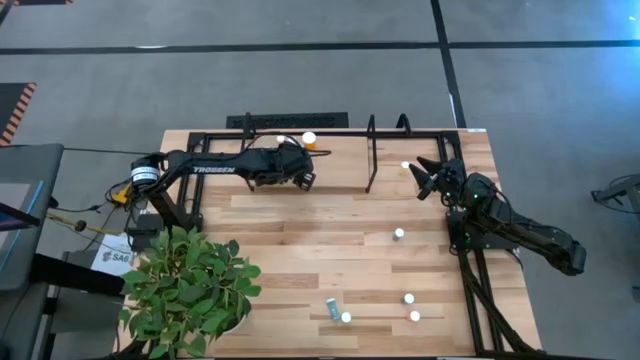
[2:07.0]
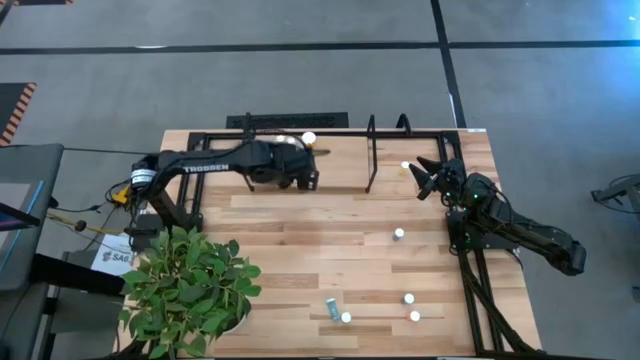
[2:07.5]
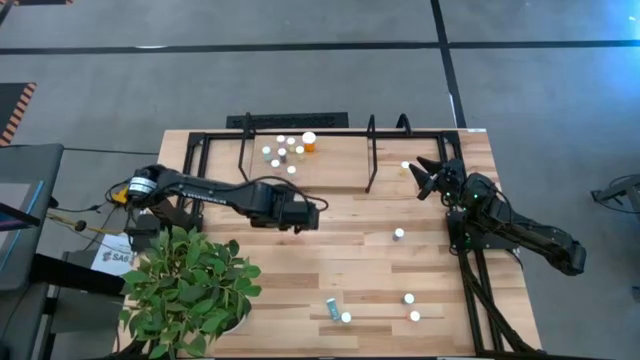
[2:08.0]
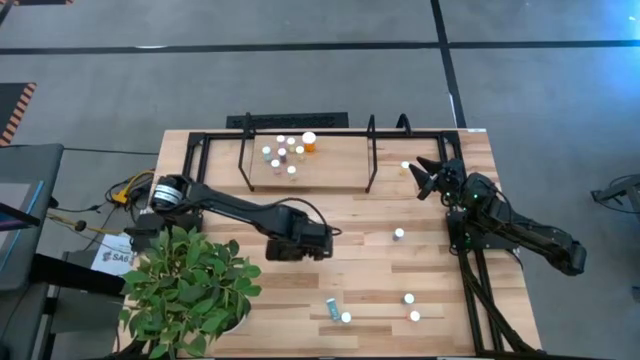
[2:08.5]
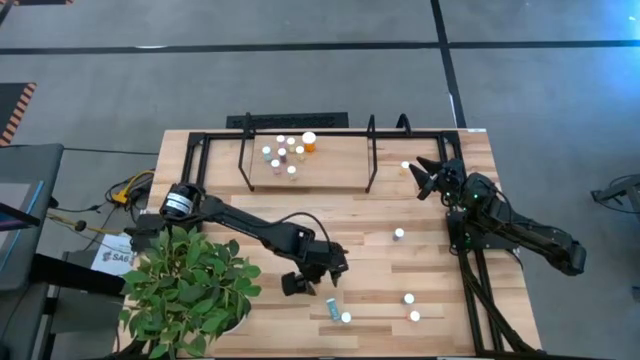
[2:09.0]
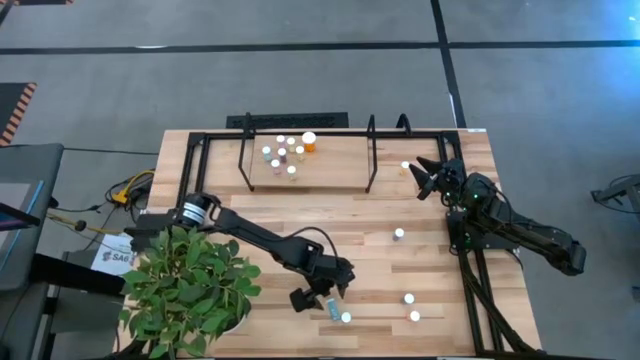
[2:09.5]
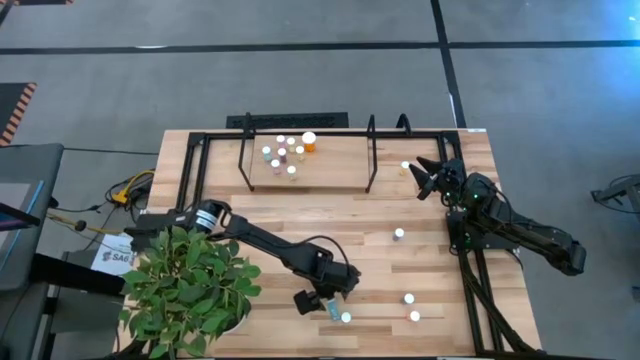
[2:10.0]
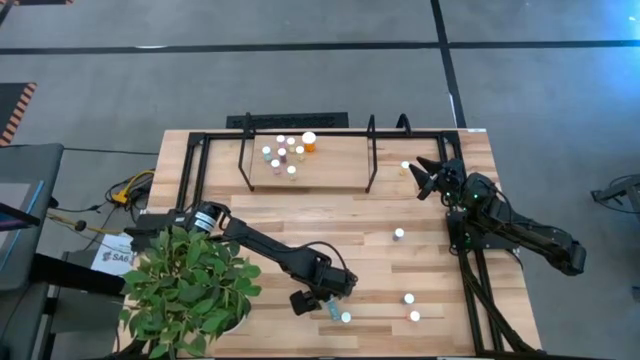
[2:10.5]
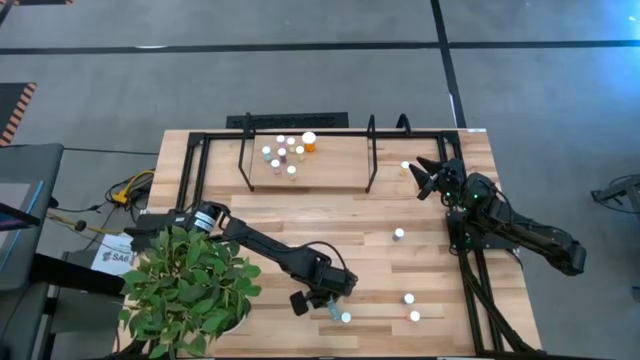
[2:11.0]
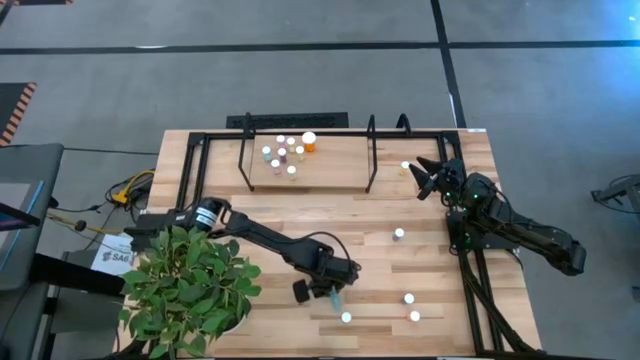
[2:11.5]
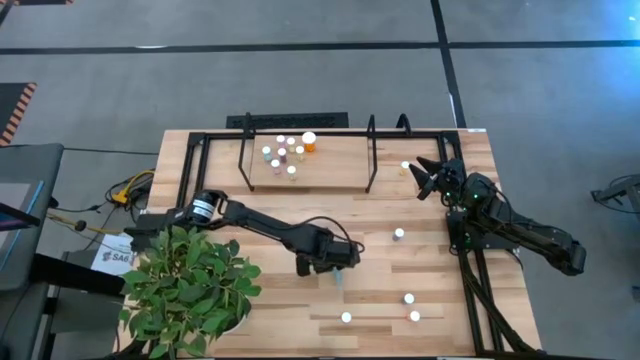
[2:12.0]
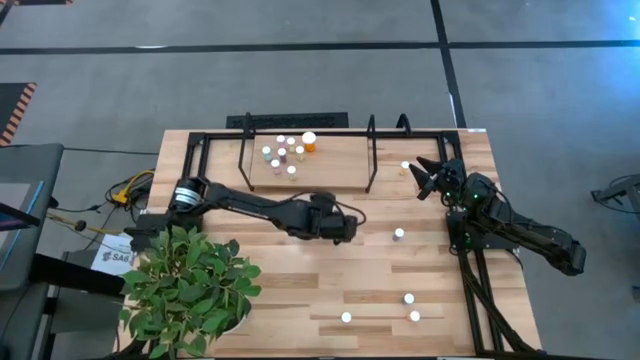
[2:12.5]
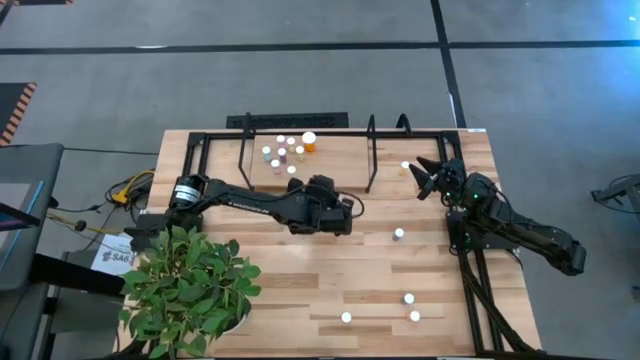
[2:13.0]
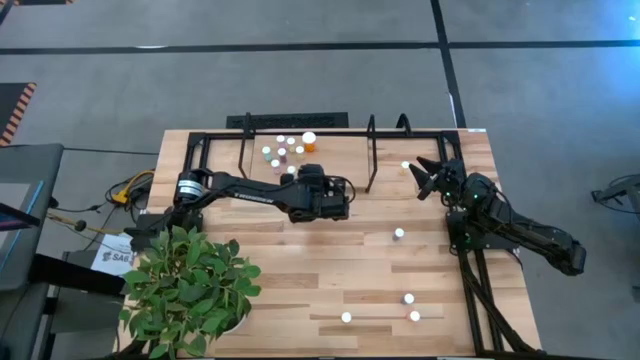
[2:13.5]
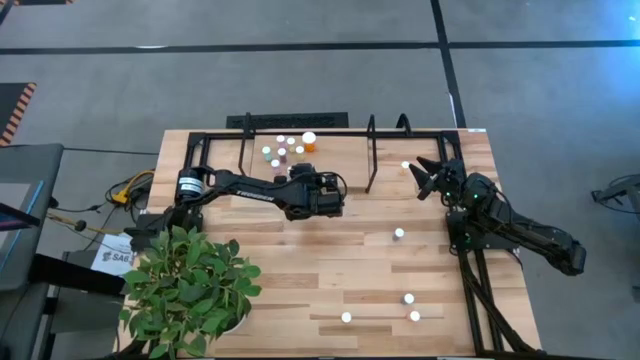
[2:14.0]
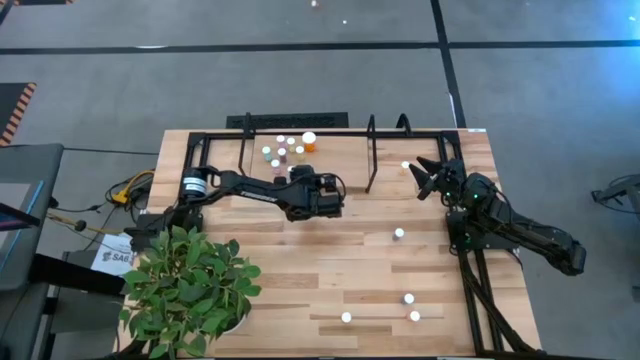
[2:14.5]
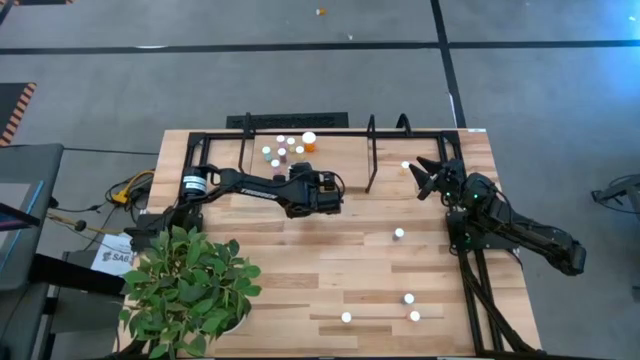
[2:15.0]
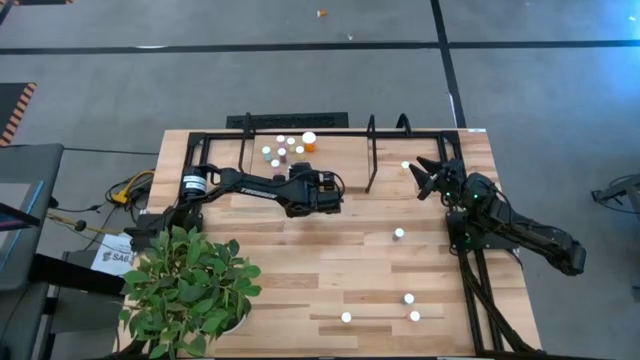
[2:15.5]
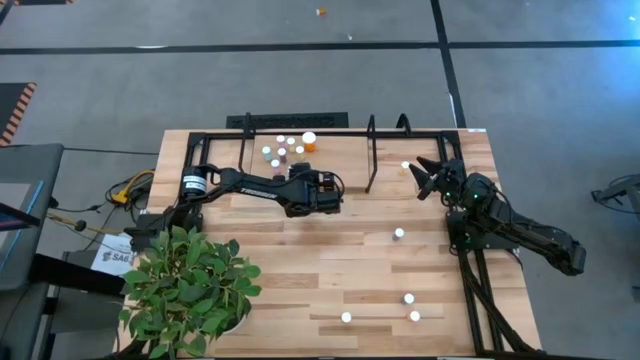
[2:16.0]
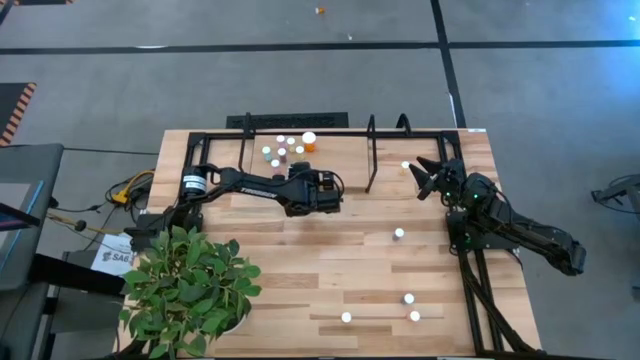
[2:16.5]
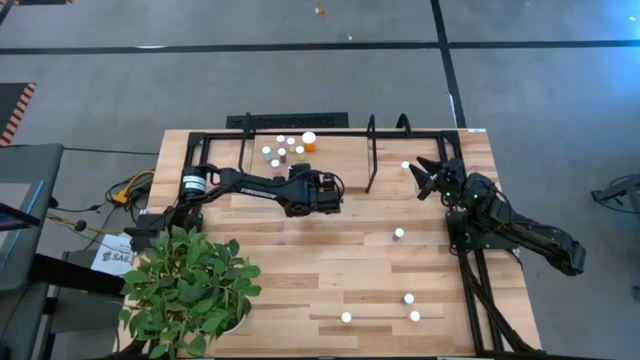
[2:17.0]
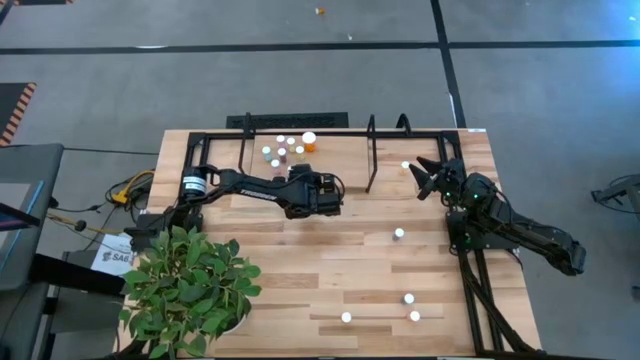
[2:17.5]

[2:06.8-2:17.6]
Task: Pick and place medicine bottles onto shelf by color
Put the blue pill bottle on the shelf

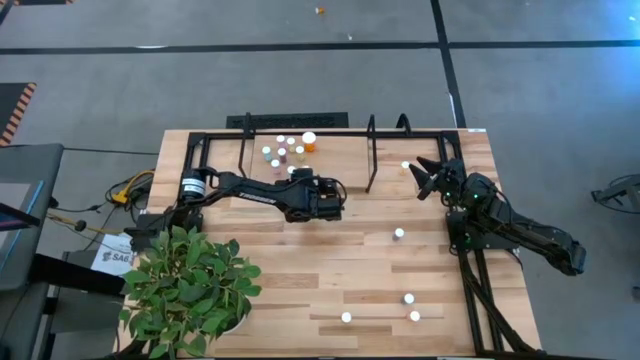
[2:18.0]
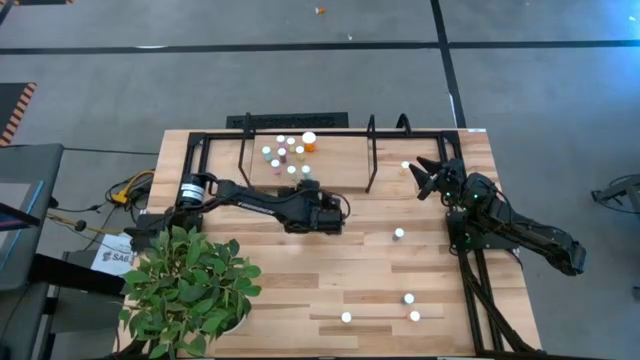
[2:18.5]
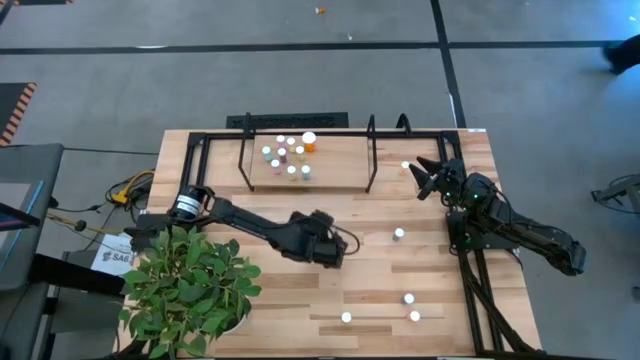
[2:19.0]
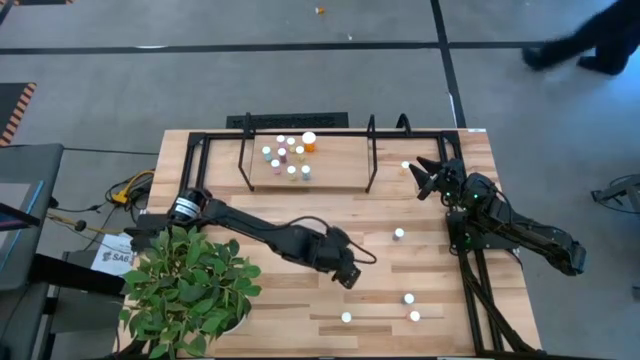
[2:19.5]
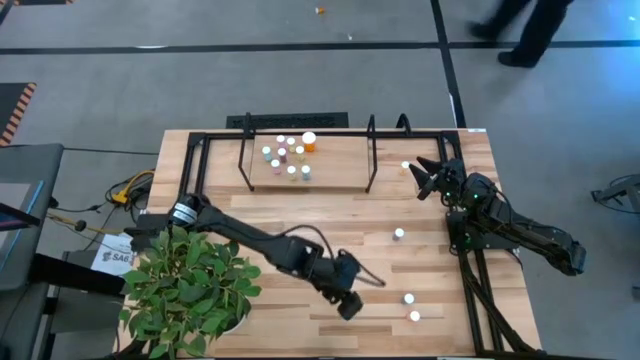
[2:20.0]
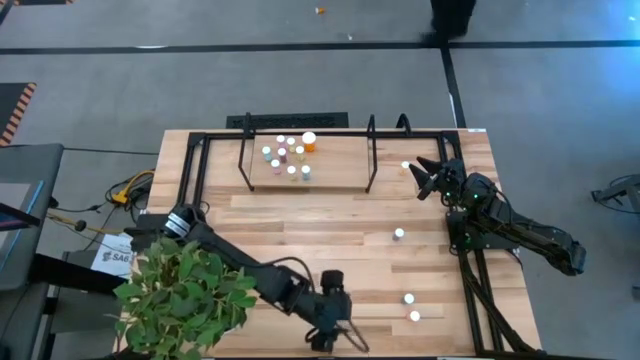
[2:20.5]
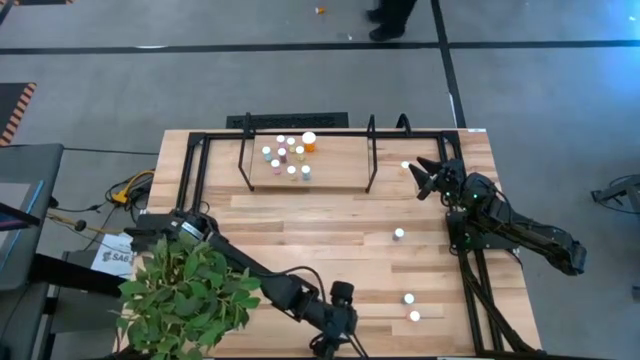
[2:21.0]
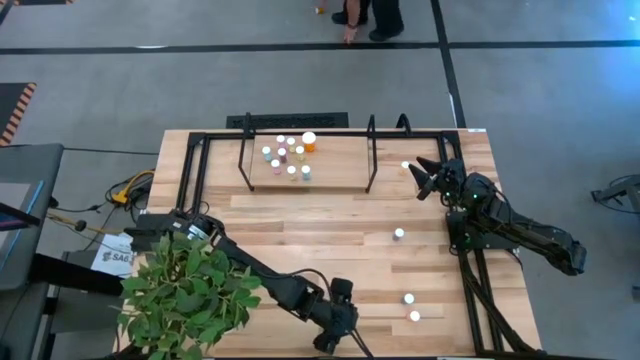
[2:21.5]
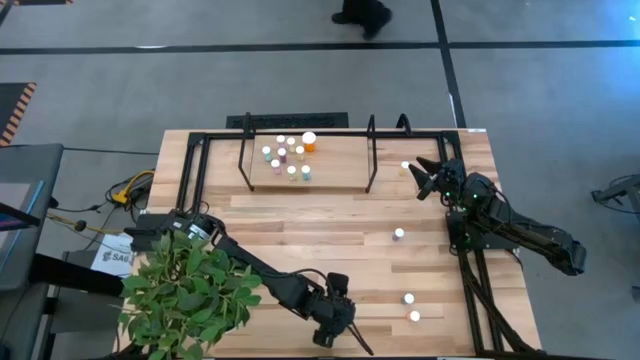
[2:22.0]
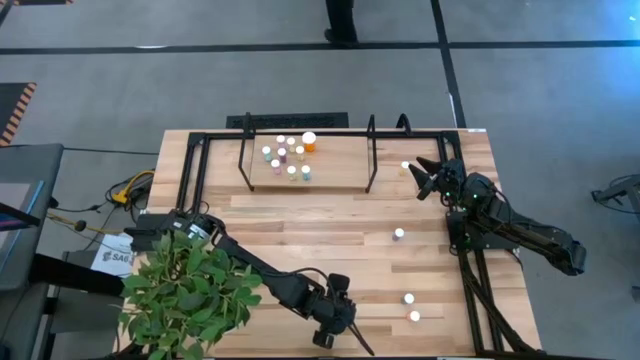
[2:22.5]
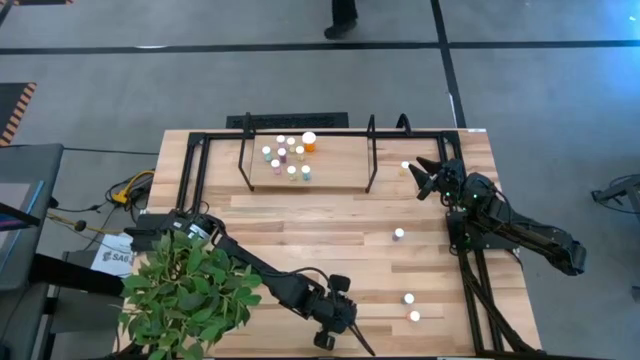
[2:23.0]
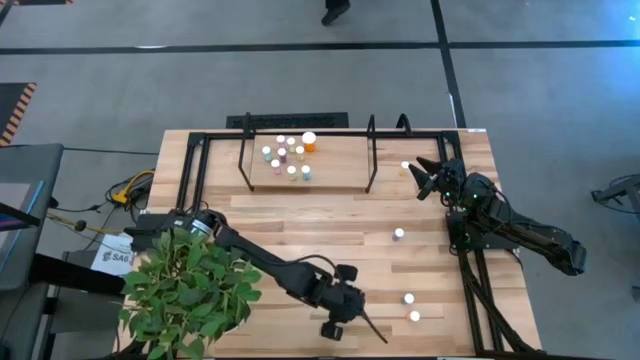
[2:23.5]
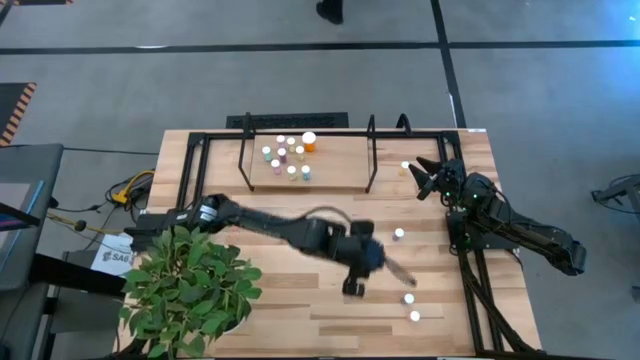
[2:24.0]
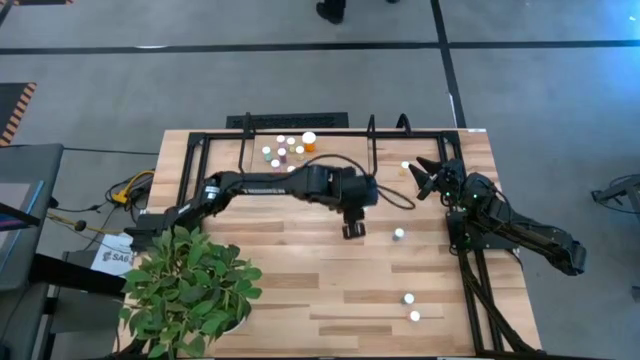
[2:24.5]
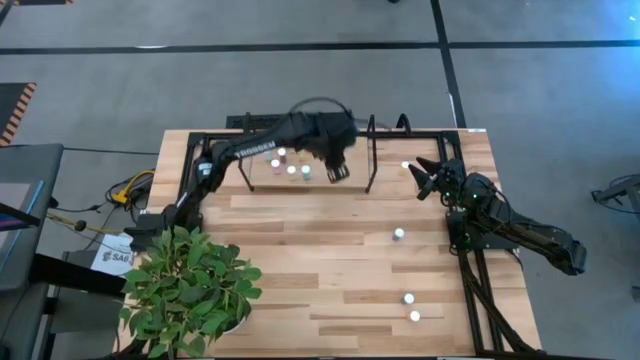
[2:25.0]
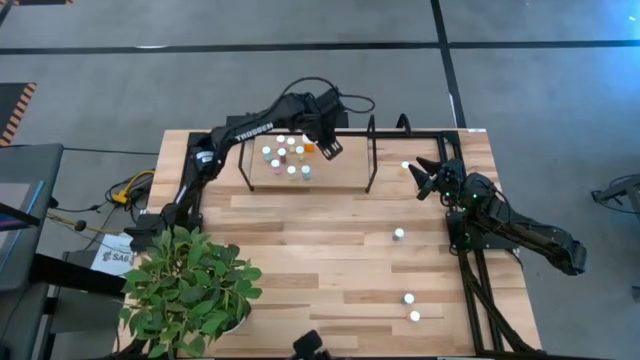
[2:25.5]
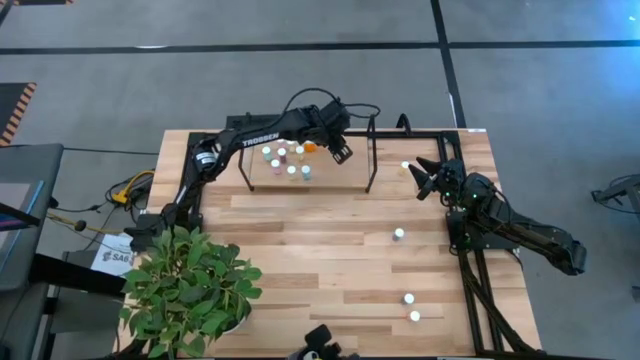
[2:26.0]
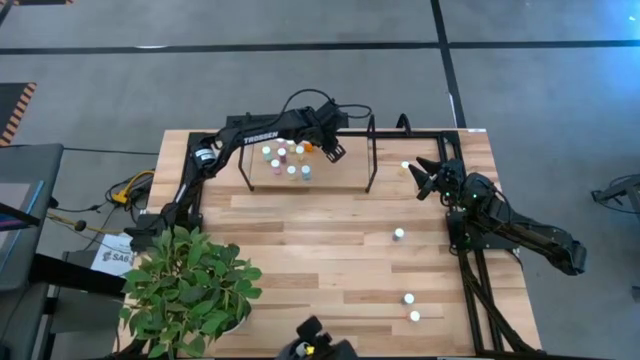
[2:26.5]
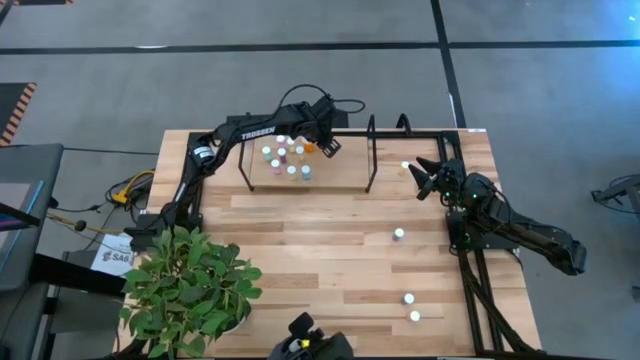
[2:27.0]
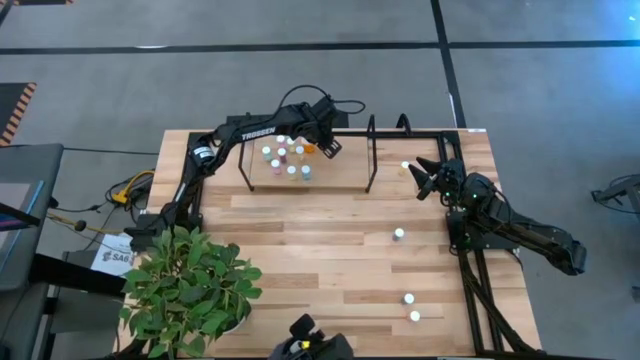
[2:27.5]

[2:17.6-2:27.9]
Put the yellow pill bottle on the shelf
